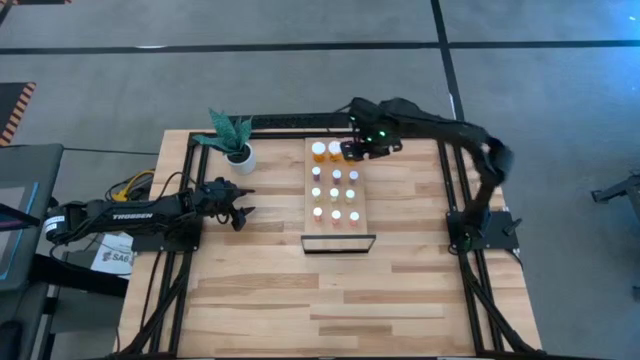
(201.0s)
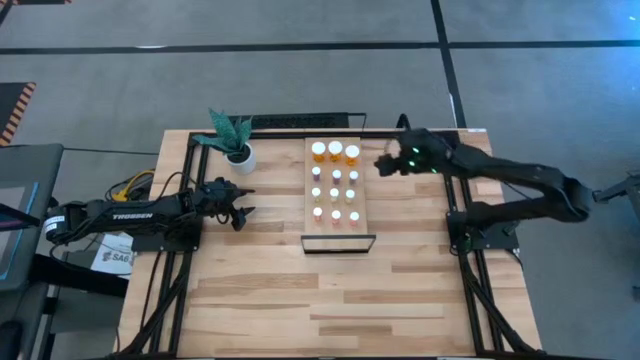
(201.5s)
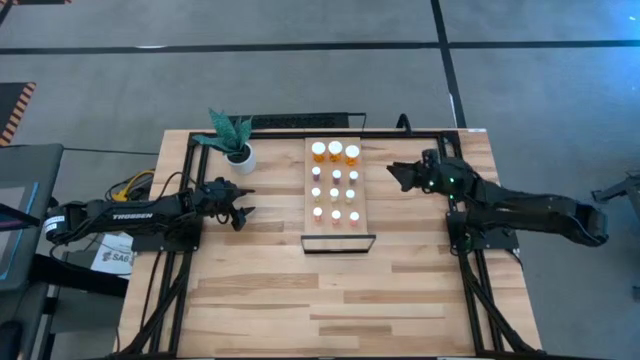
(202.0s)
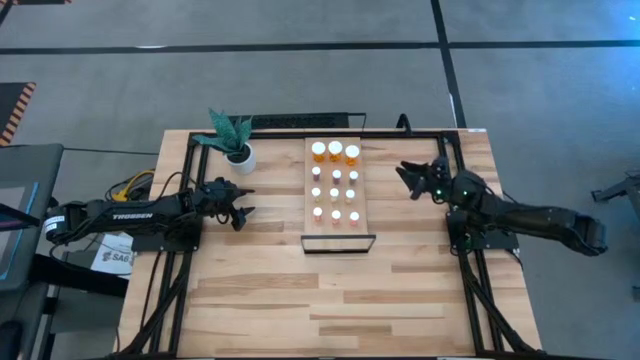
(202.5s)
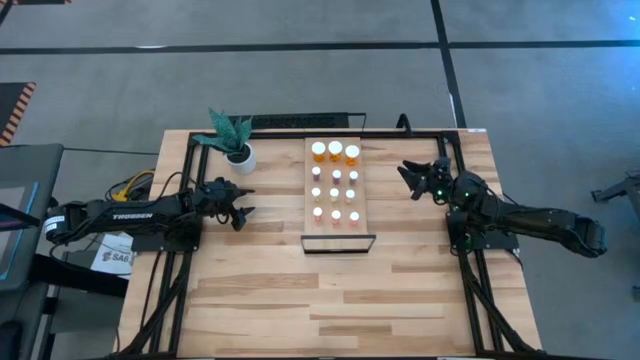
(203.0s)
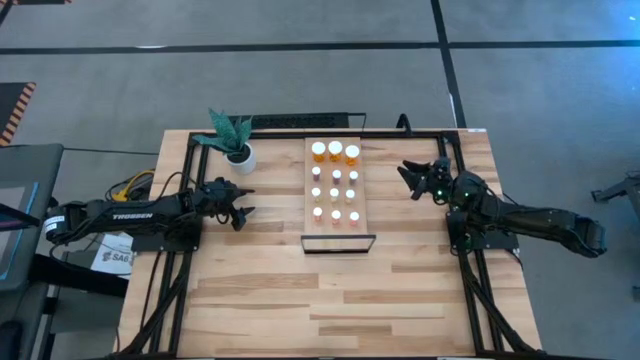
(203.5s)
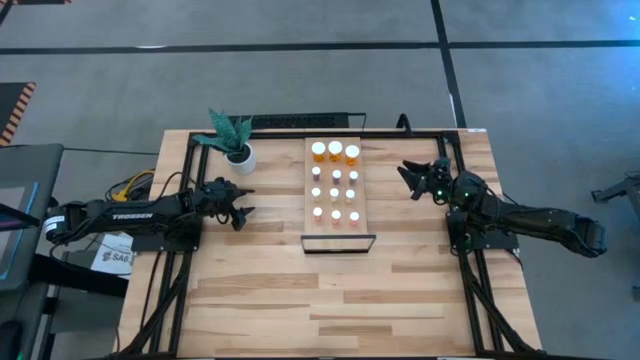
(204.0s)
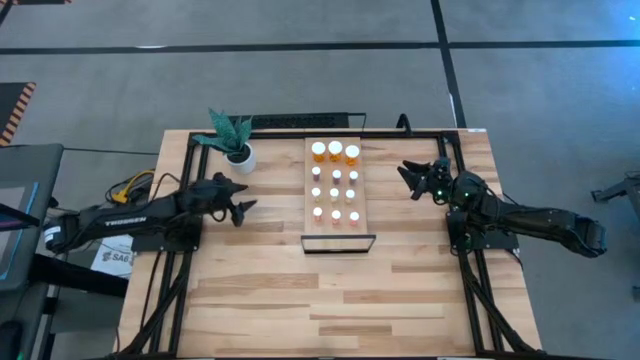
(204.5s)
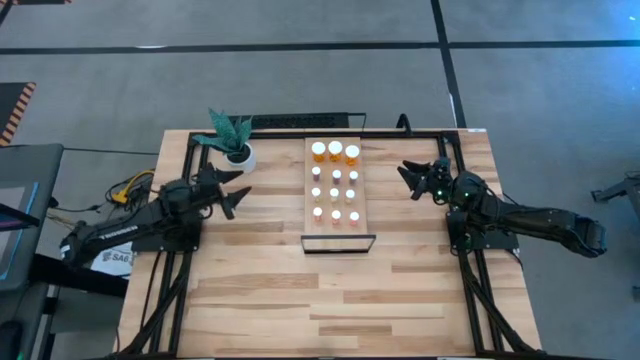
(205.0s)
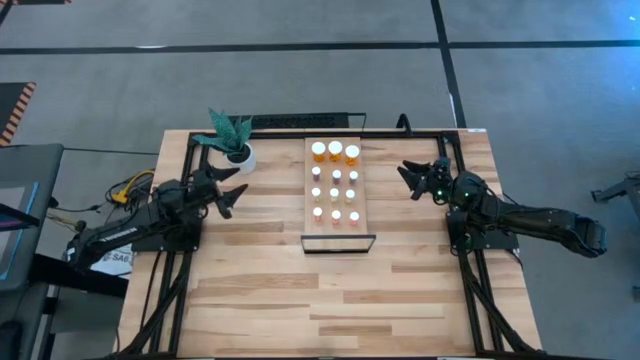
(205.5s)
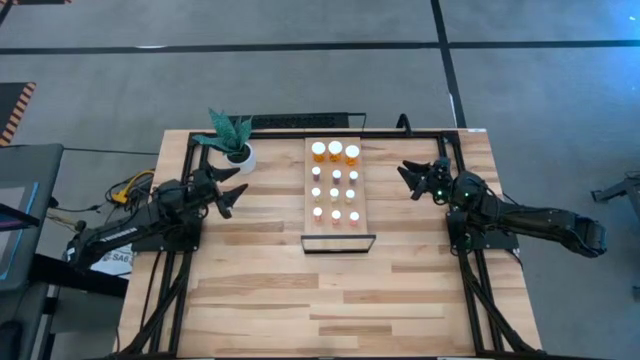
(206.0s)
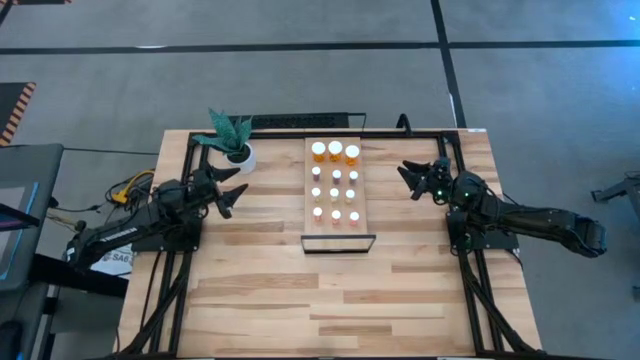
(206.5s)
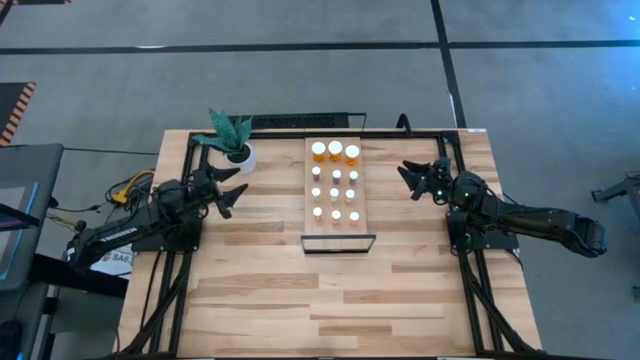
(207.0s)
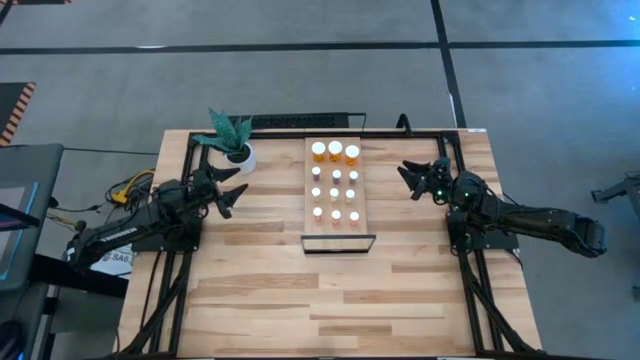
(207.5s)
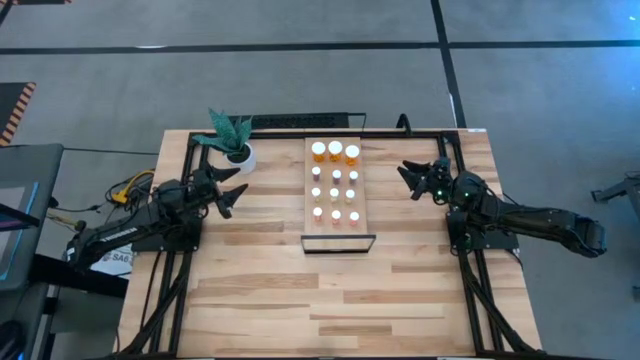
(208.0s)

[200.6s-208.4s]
Task: Pick and place medicine bottles onto shelf by color
Return to Home Position

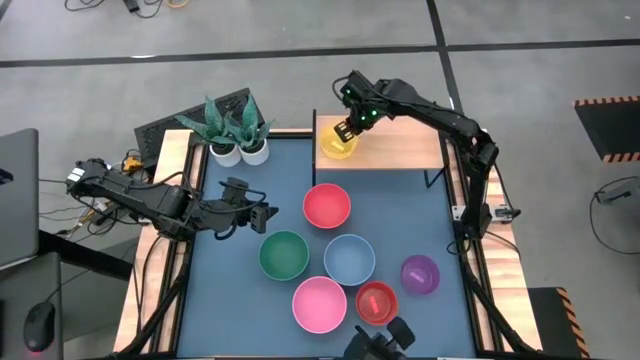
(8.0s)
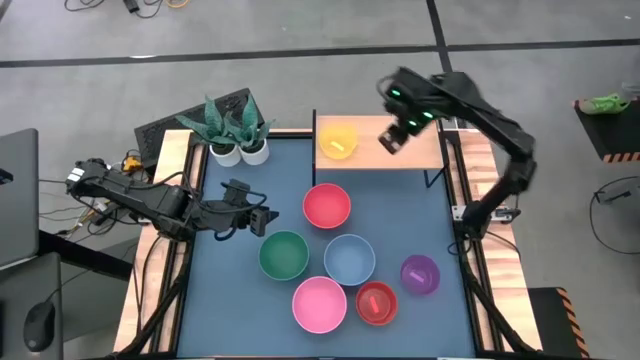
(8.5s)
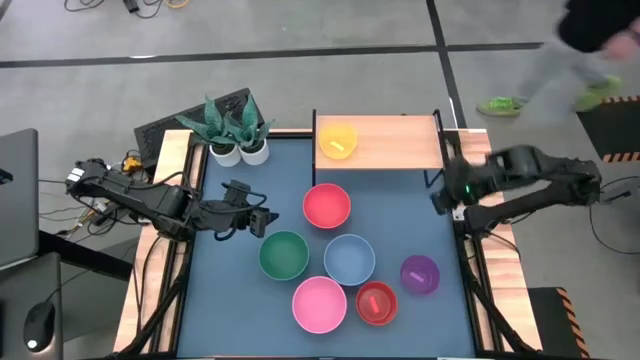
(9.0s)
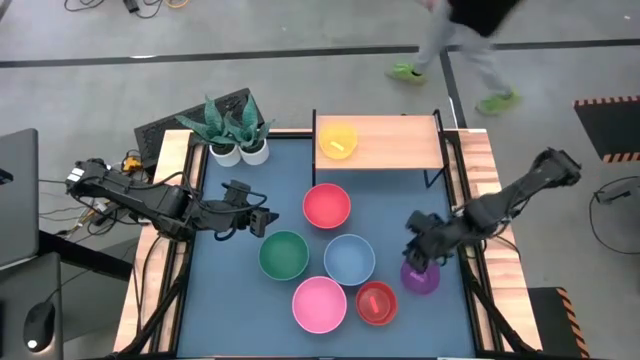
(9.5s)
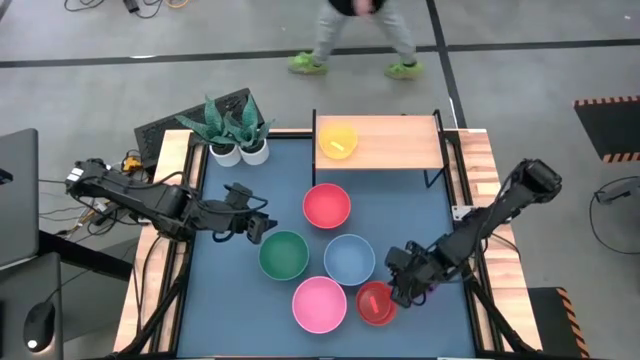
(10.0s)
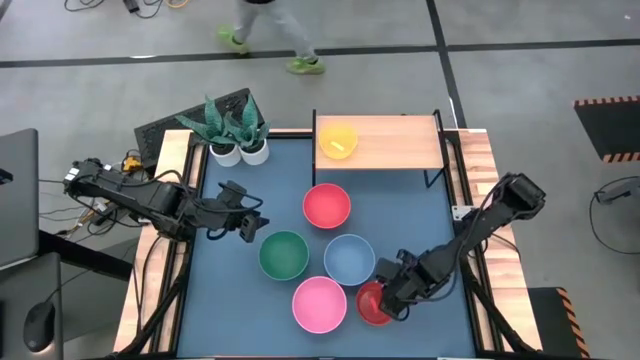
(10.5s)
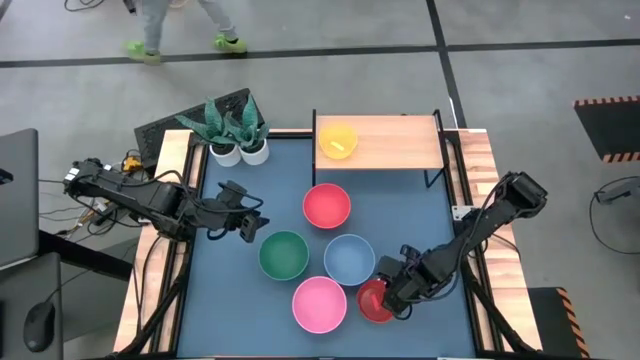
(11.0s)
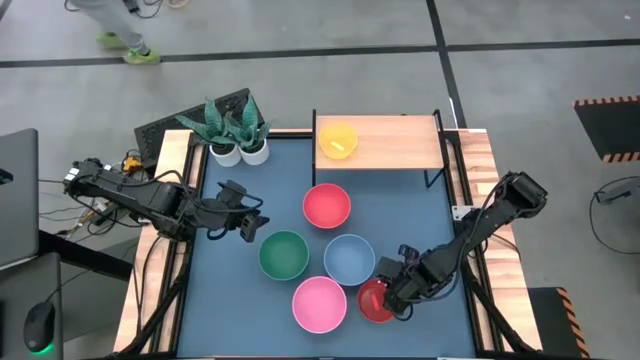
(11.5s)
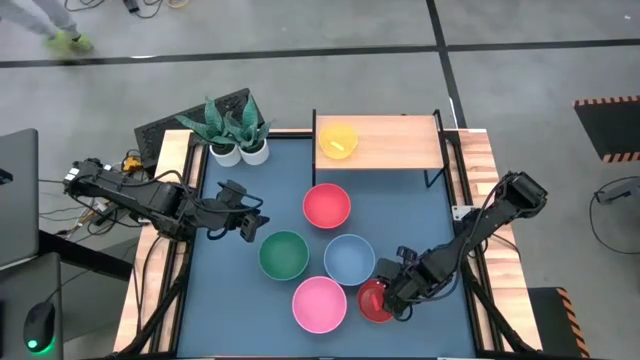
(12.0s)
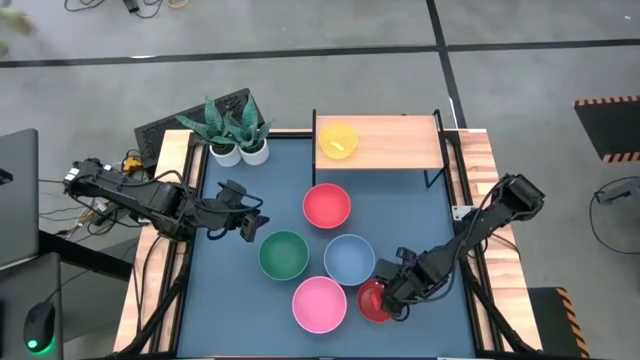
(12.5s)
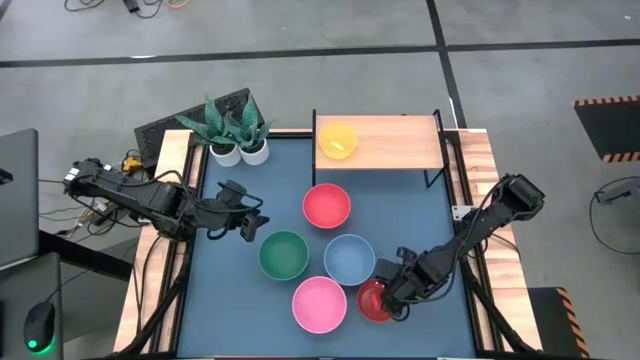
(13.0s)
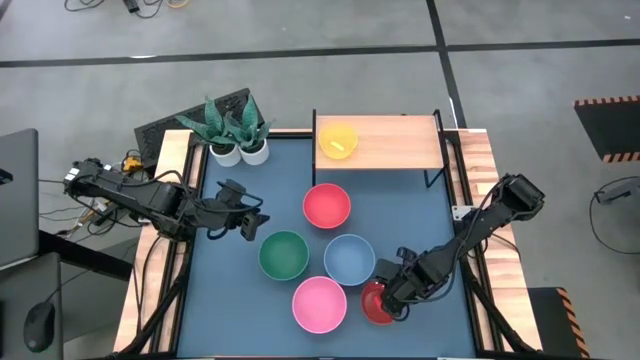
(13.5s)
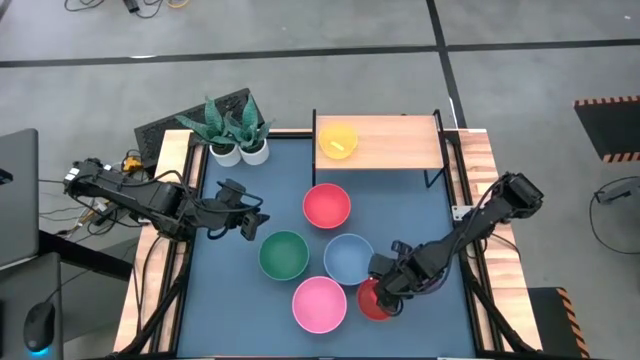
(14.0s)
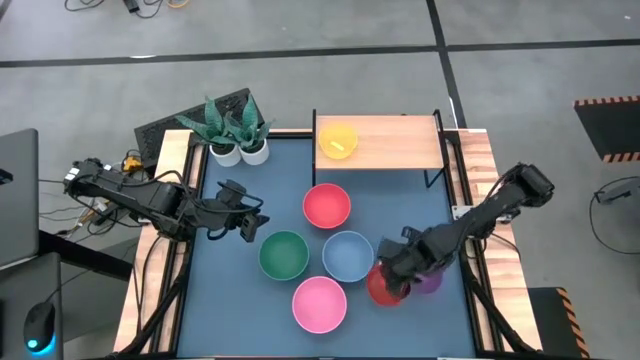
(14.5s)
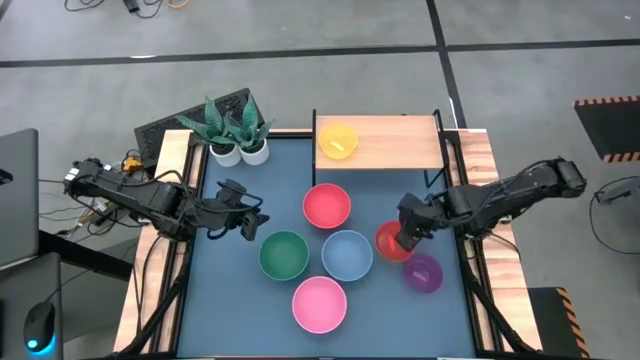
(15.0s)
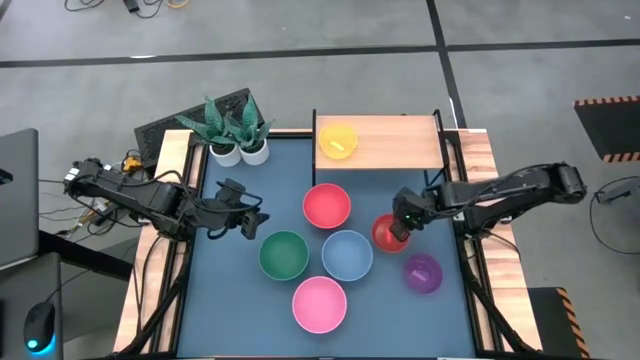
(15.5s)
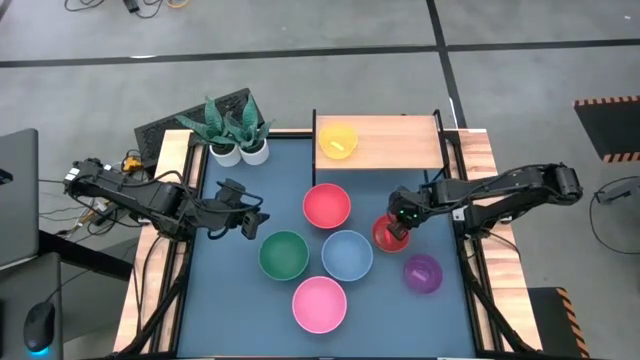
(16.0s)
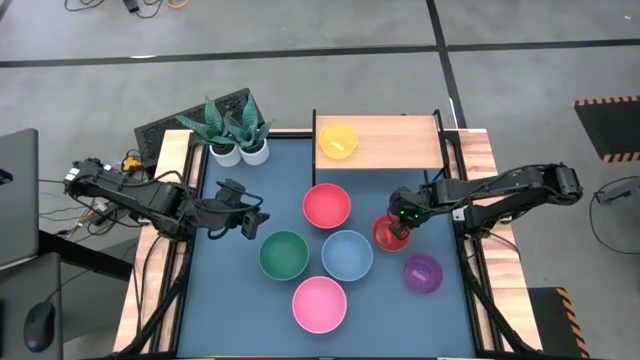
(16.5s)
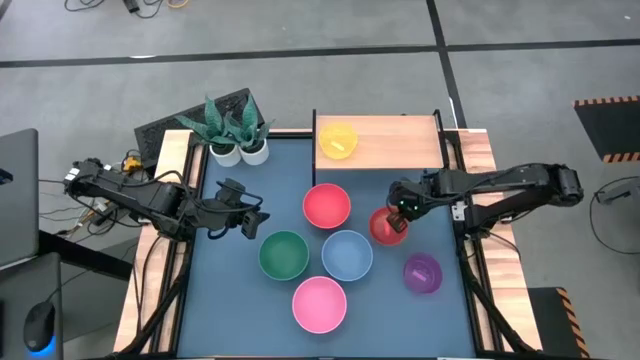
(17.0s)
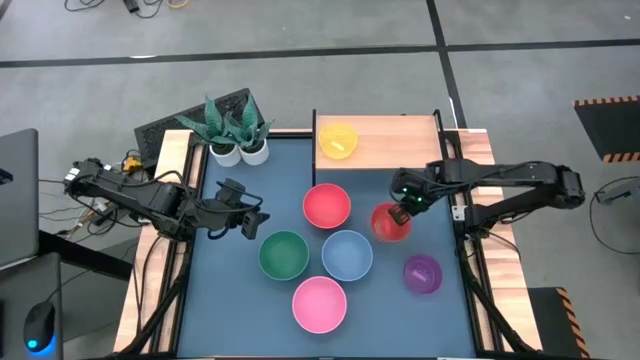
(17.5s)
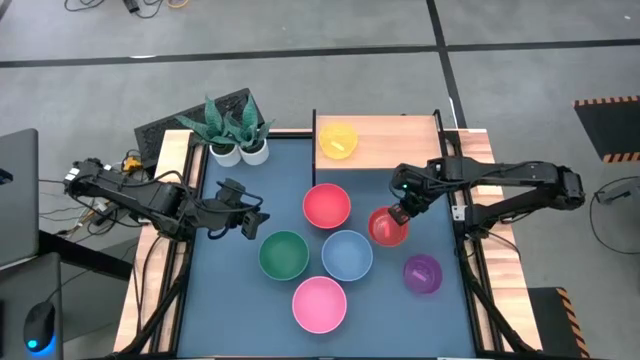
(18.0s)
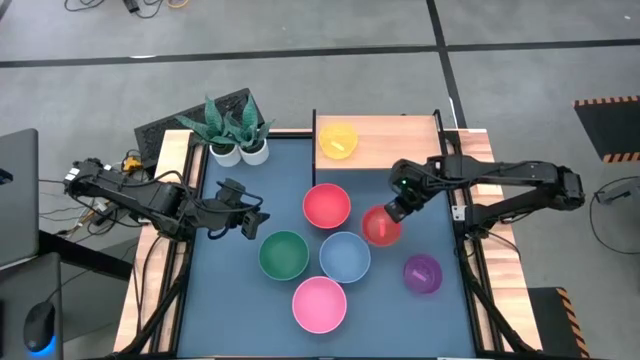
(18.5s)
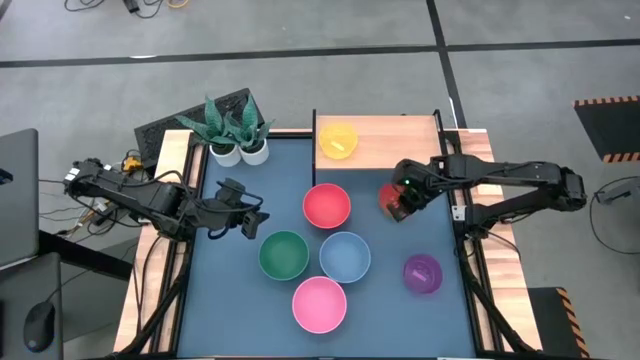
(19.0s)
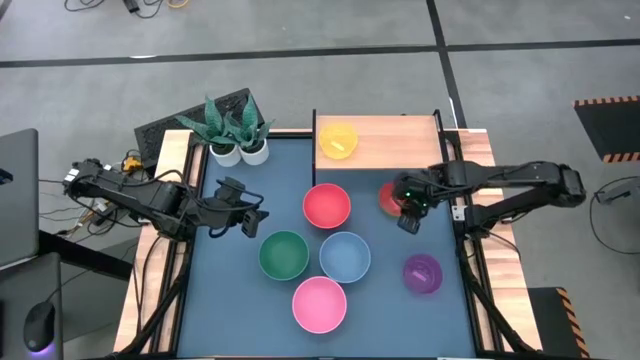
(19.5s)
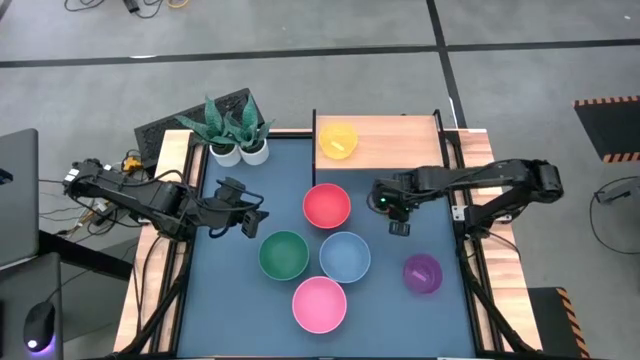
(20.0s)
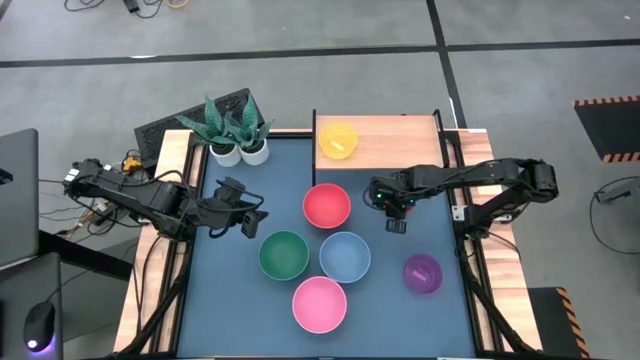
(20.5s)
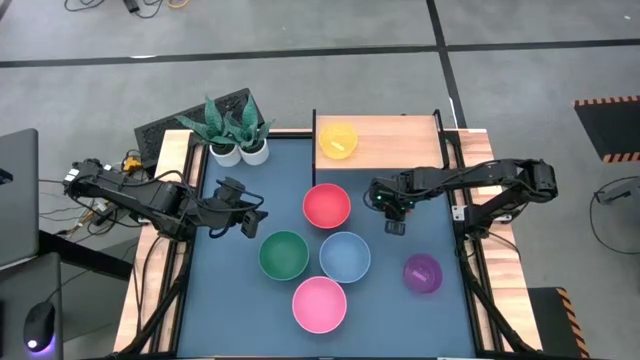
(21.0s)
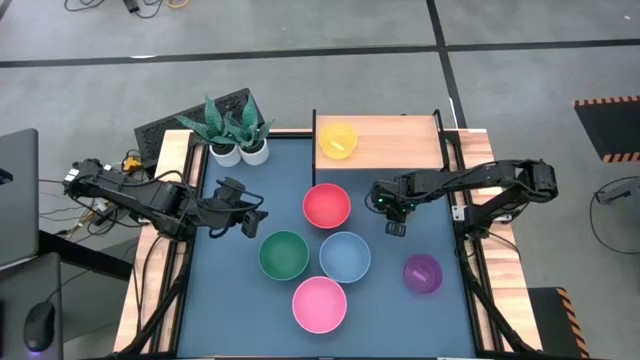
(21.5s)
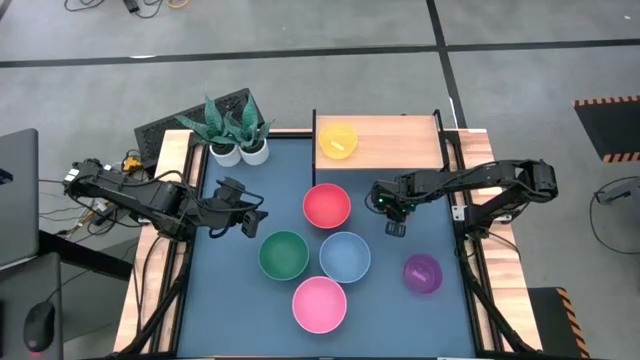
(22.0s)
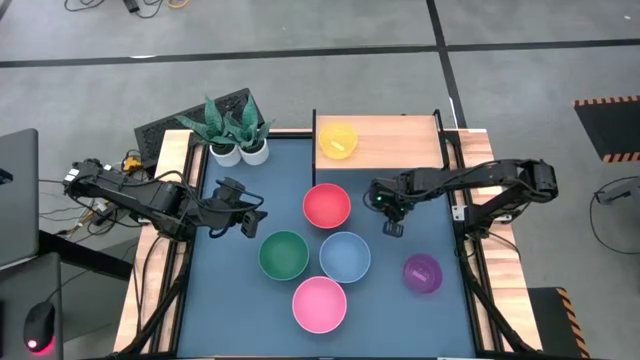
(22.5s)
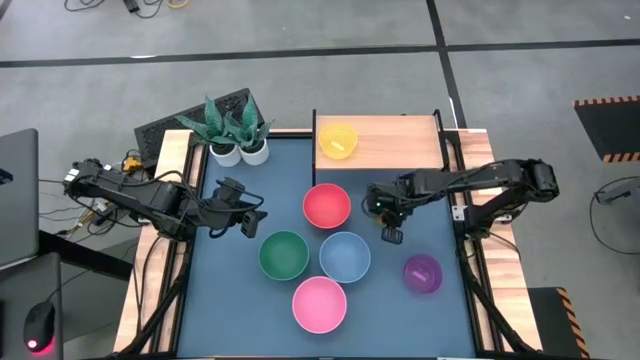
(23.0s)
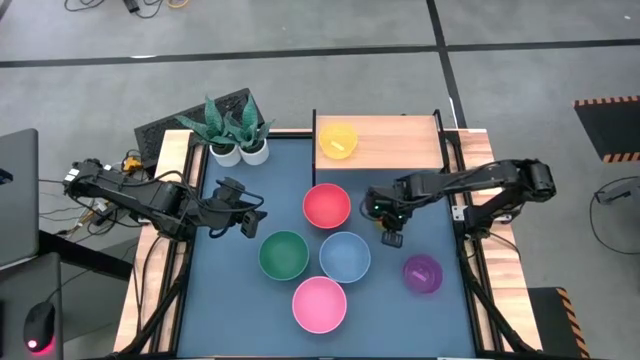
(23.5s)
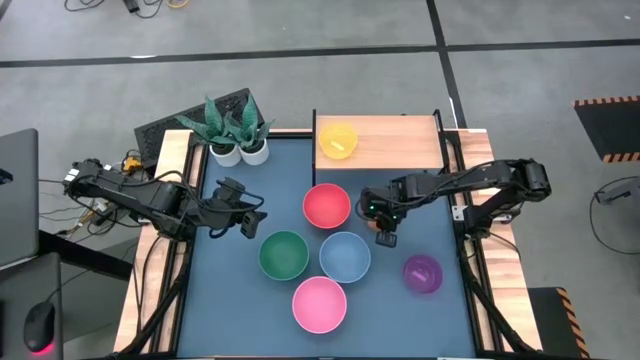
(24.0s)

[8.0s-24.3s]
Task: Place and stack bowls onto a shelf
Stack the orange transparent bowl on top of the yellow transparent bowl on the shelf
